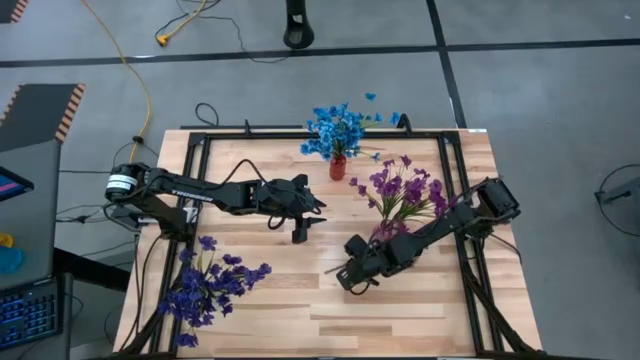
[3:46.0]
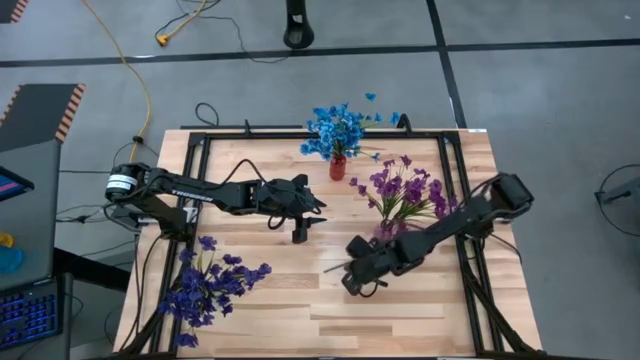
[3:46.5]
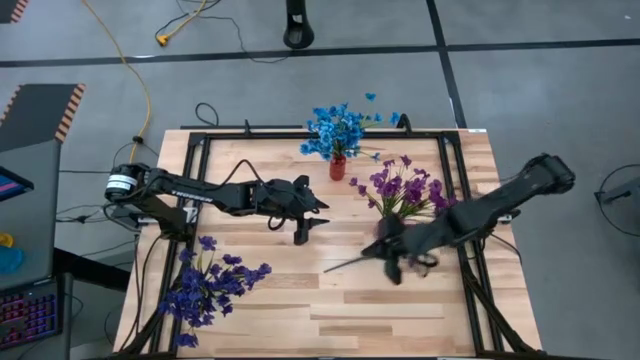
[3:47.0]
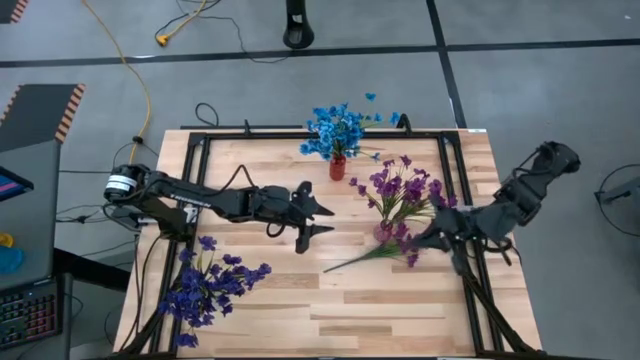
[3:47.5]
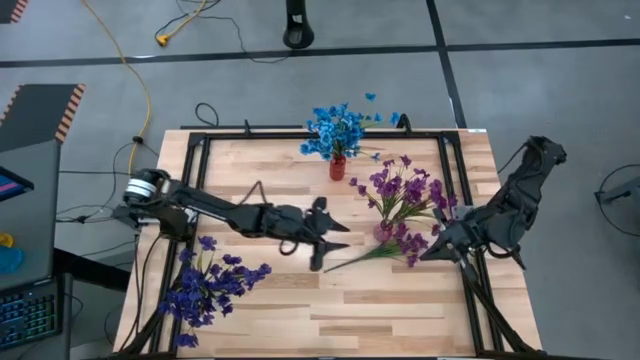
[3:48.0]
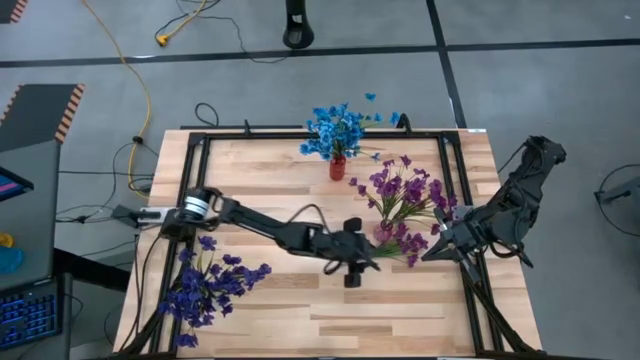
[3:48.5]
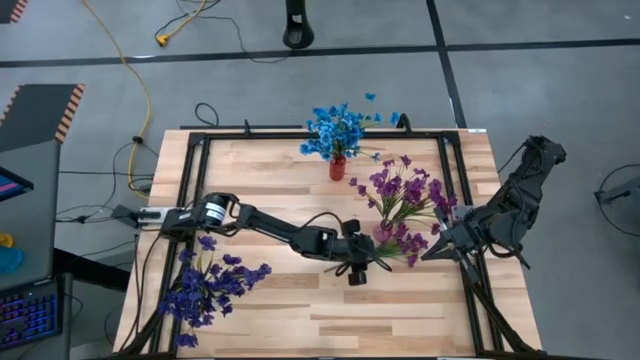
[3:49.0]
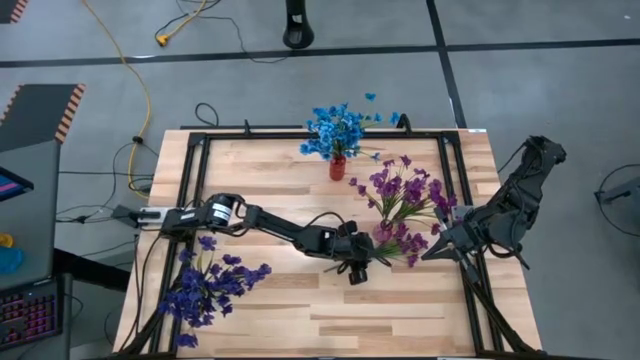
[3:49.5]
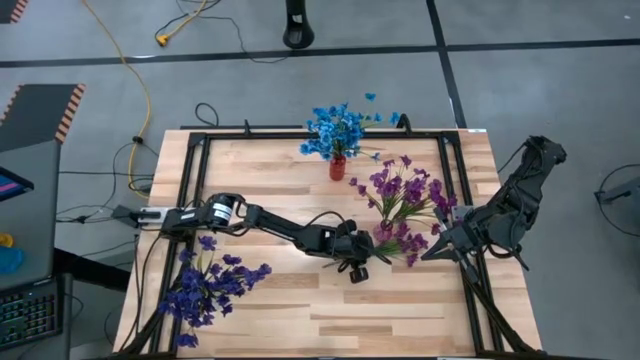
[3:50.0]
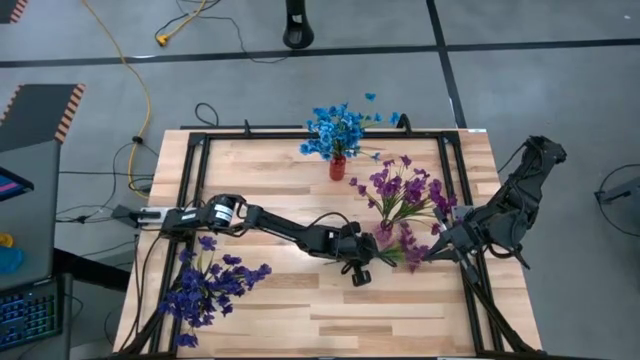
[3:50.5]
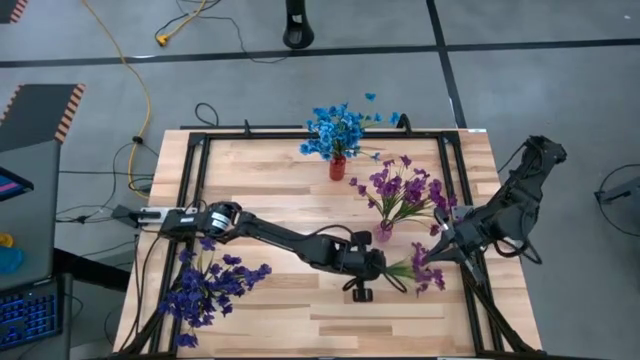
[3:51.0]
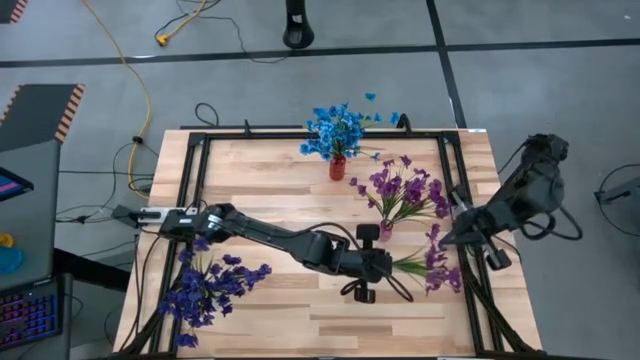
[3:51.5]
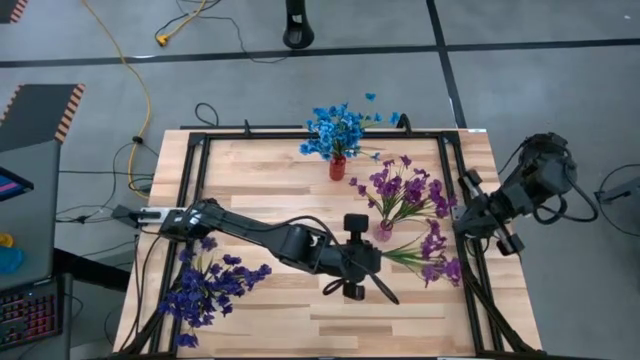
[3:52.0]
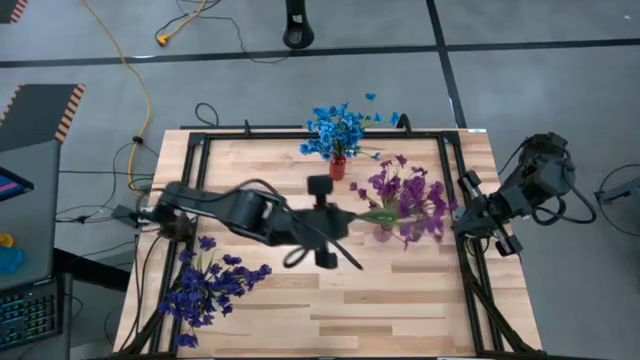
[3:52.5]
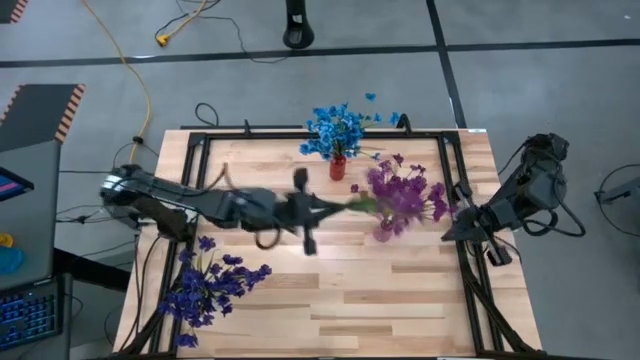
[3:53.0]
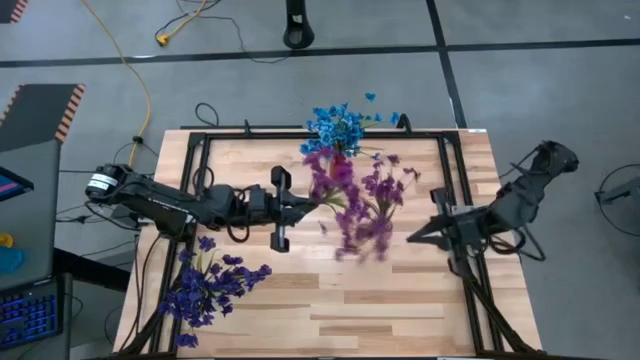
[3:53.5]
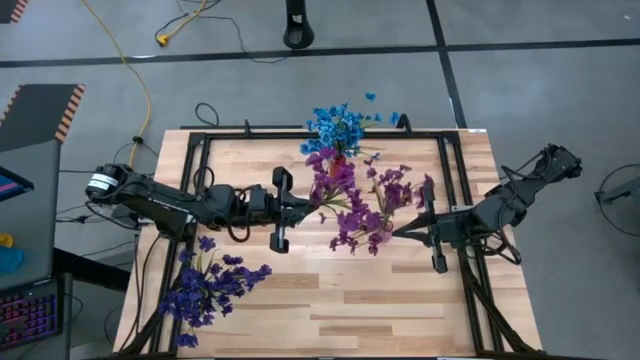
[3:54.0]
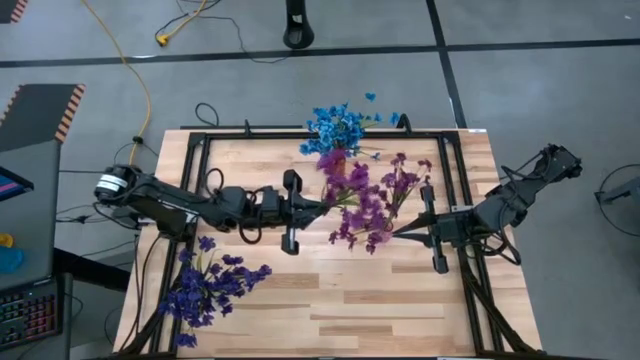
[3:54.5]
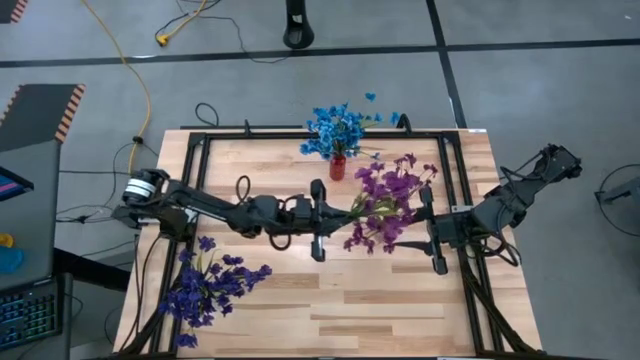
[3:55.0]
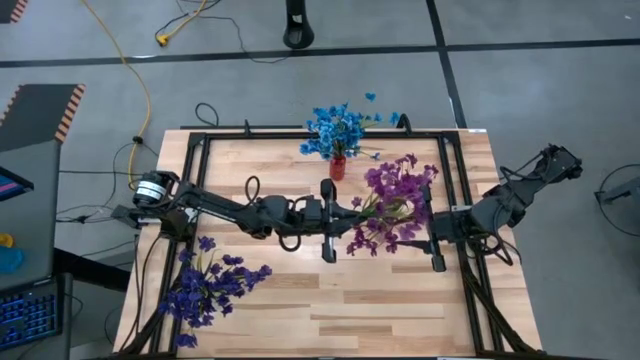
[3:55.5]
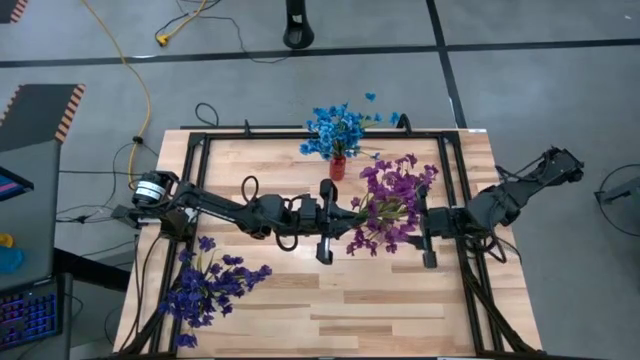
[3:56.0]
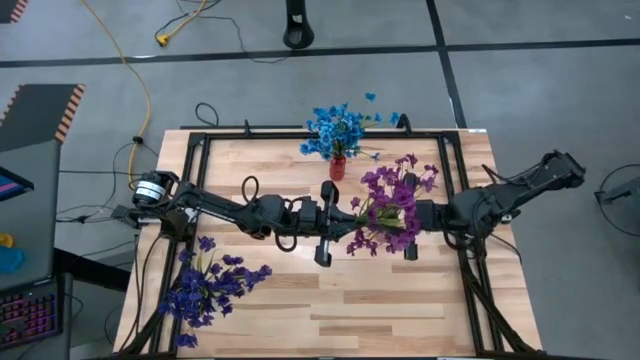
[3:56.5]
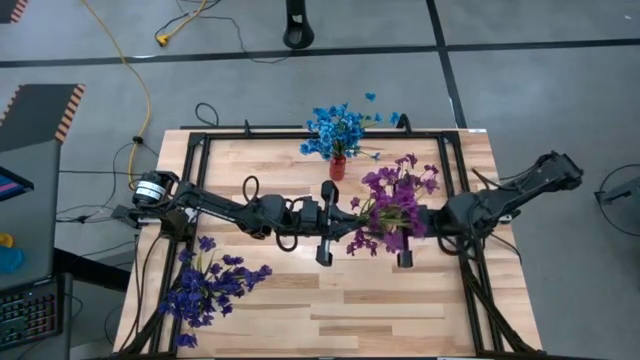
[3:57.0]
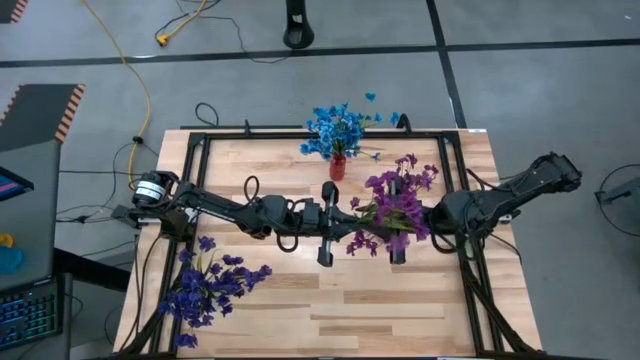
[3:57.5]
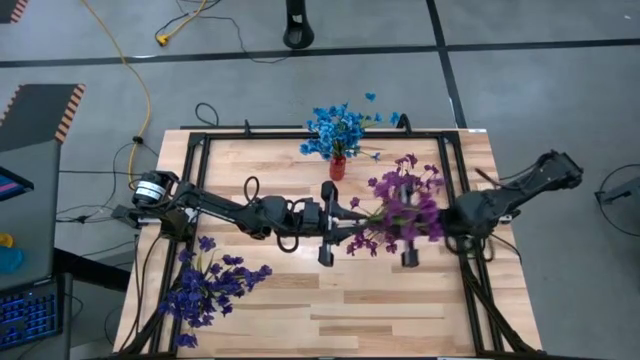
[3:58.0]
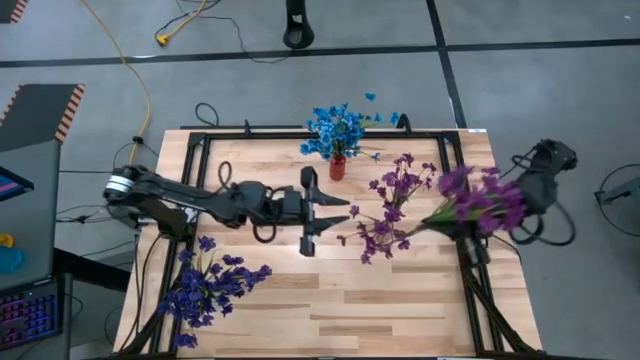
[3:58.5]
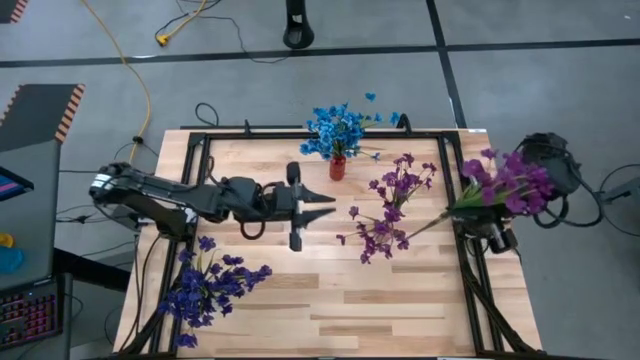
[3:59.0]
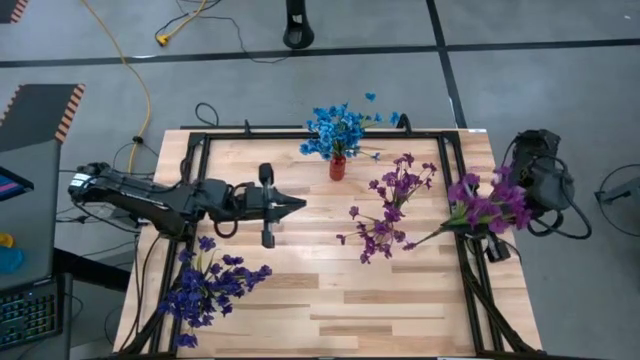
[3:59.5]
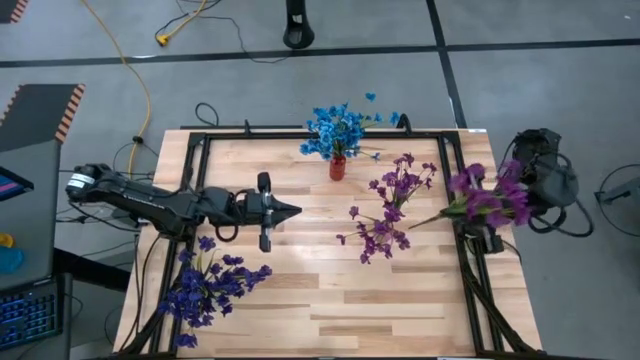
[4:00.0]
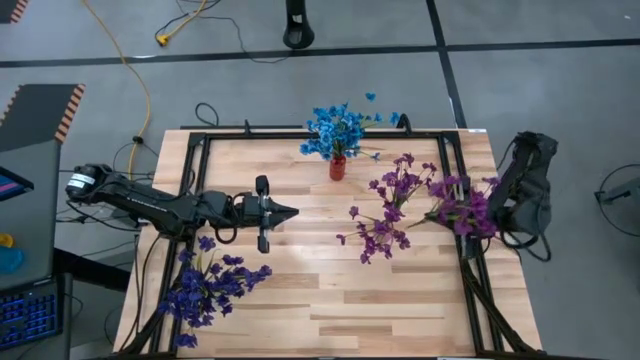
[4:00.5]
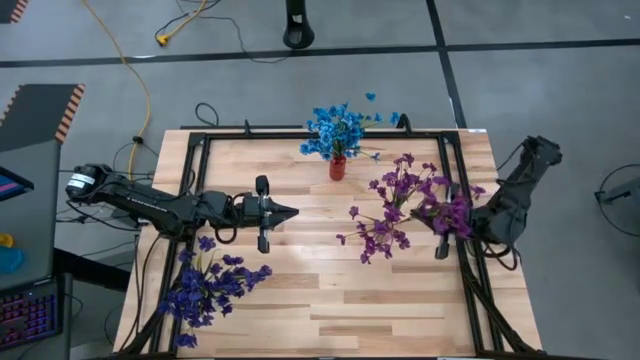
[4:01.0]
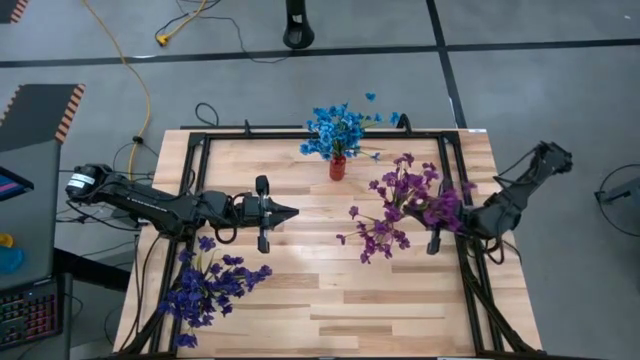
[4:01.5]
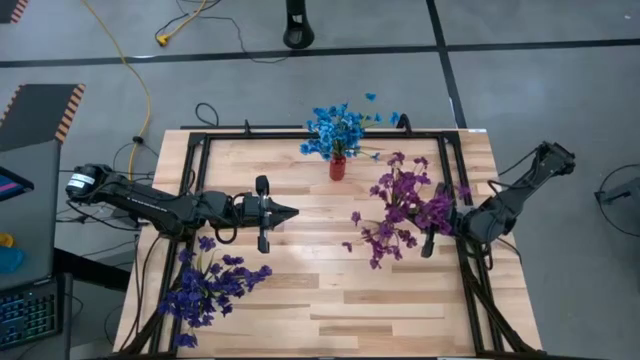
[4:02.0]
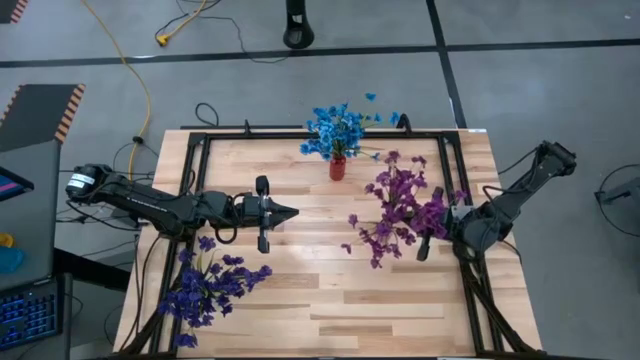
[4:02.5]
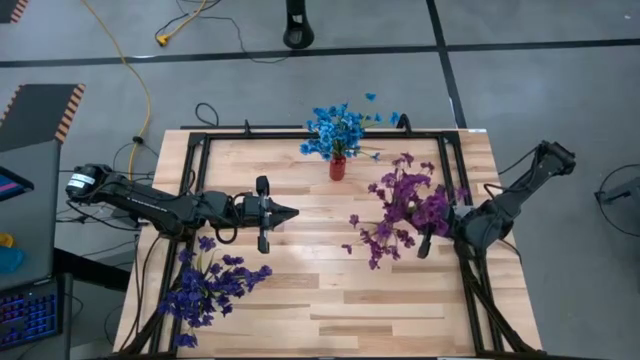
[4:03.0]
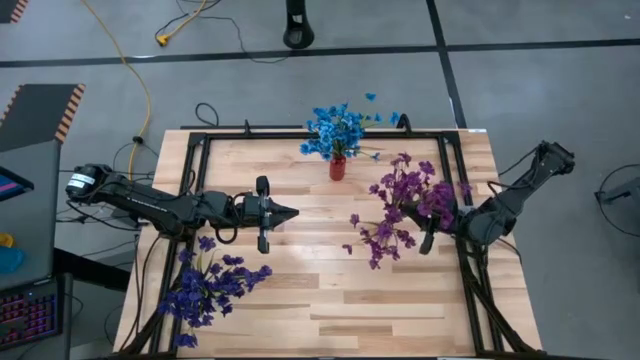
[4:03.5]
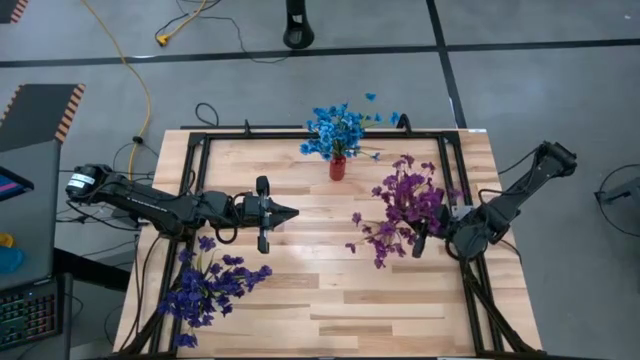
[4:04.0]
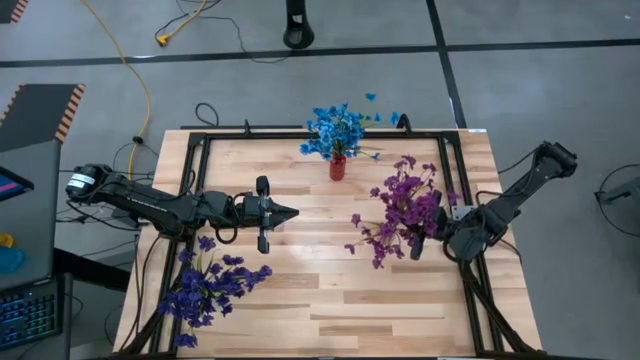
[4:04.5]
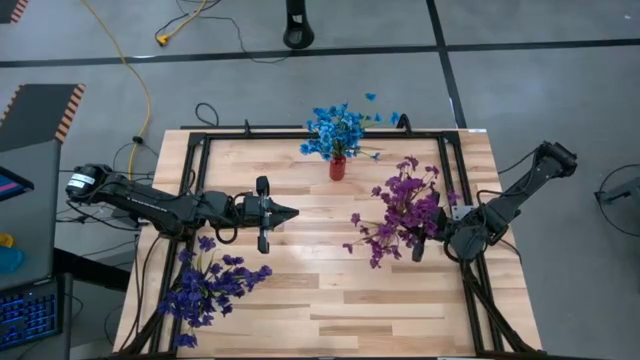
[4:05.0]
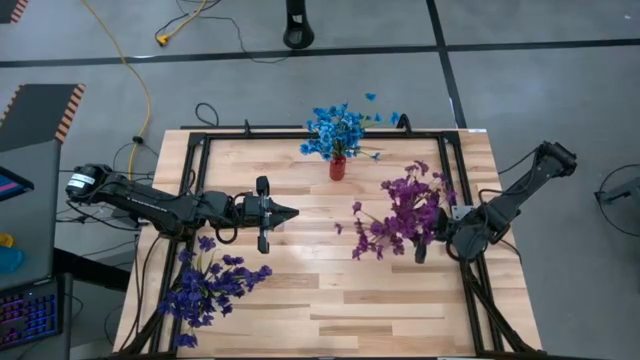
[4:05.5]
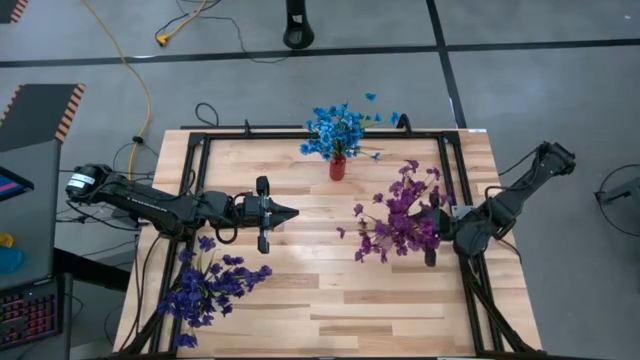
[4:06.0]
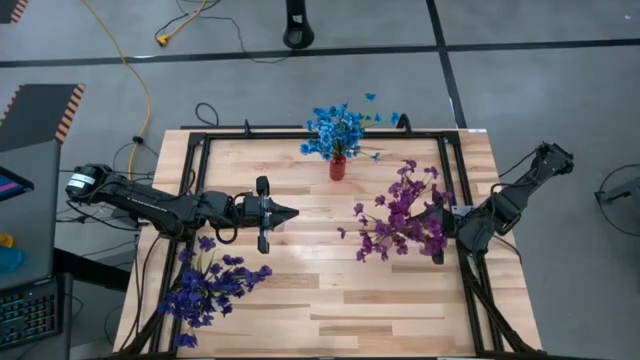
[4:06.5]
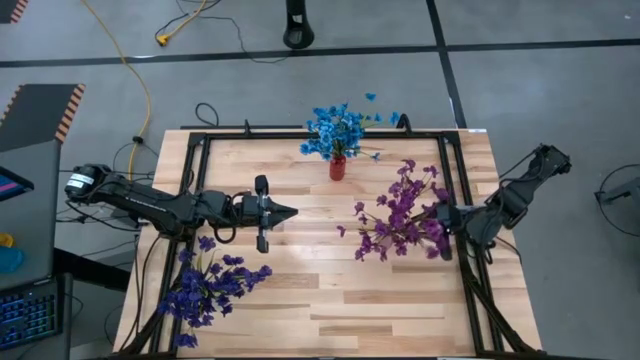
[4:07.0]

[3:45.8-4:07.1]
Task: Sort flowers into vase by color
Put the violet flowers into the violet vase
